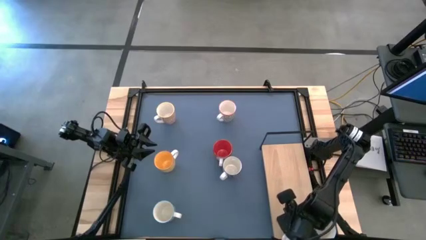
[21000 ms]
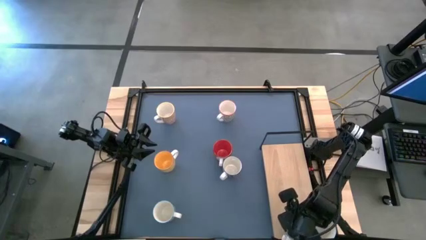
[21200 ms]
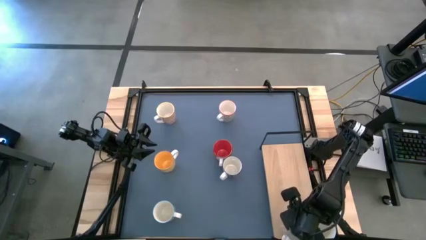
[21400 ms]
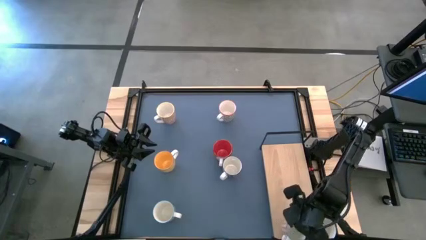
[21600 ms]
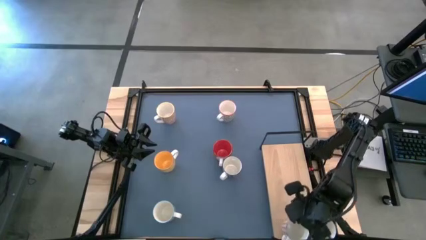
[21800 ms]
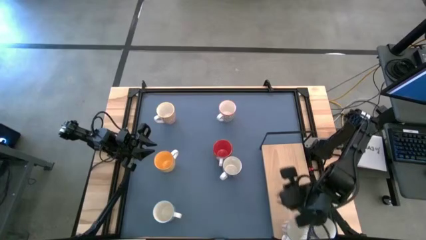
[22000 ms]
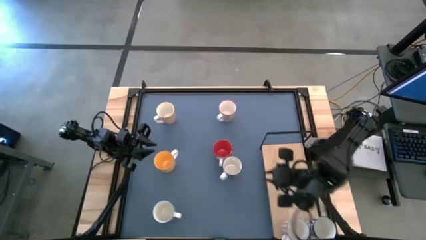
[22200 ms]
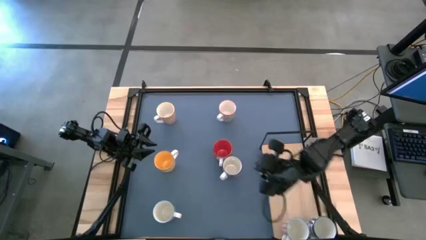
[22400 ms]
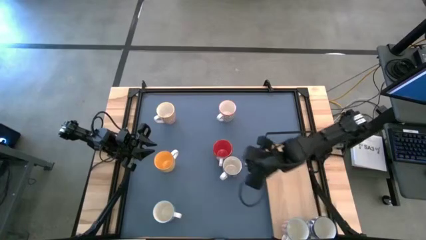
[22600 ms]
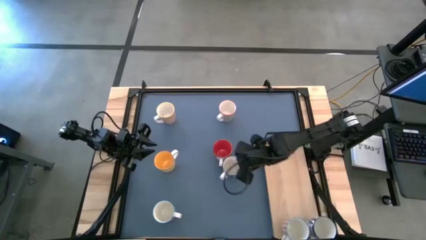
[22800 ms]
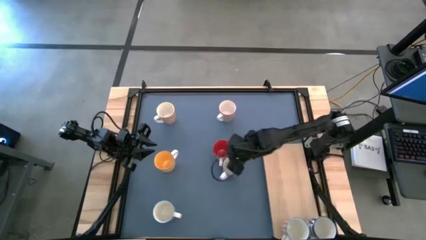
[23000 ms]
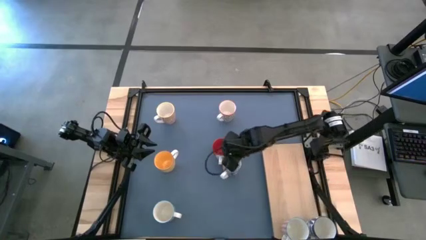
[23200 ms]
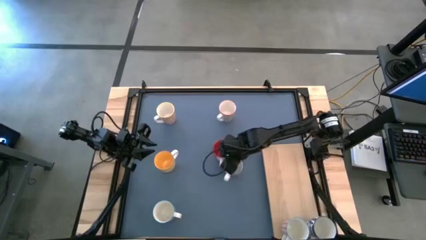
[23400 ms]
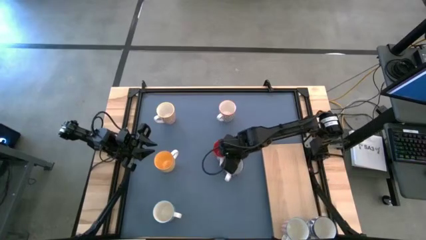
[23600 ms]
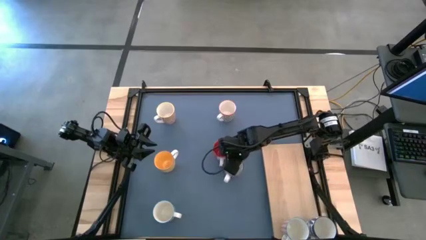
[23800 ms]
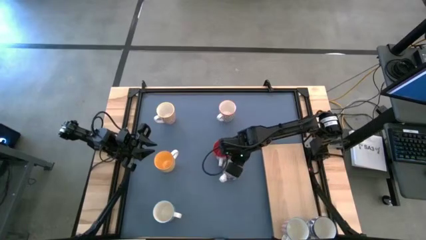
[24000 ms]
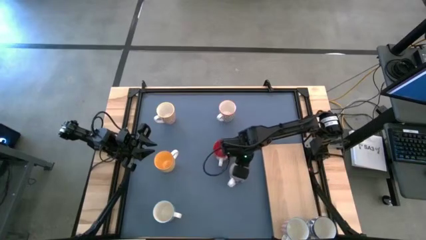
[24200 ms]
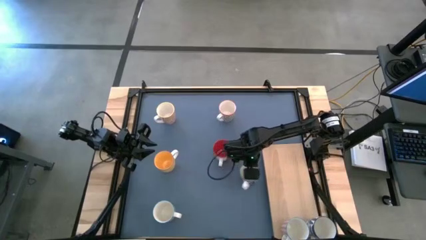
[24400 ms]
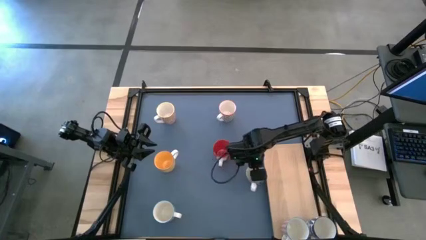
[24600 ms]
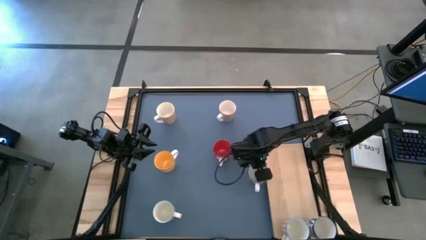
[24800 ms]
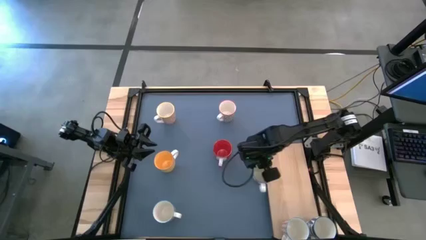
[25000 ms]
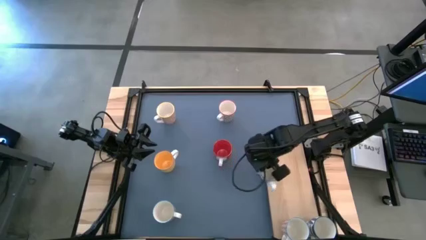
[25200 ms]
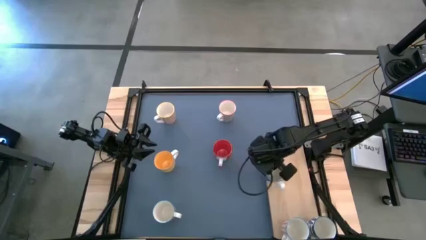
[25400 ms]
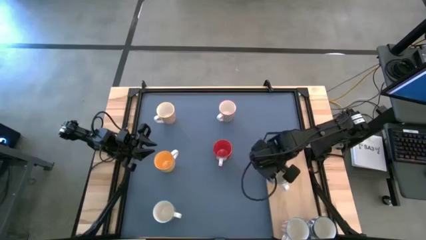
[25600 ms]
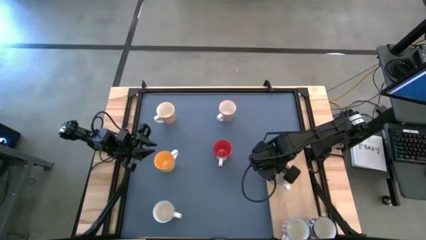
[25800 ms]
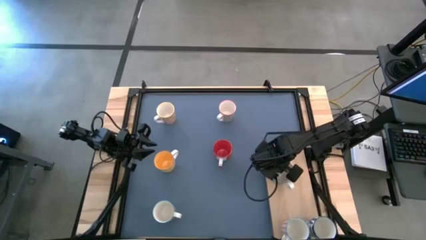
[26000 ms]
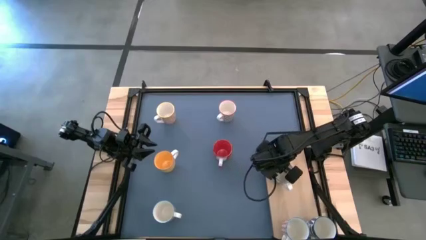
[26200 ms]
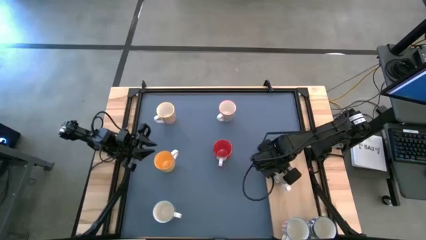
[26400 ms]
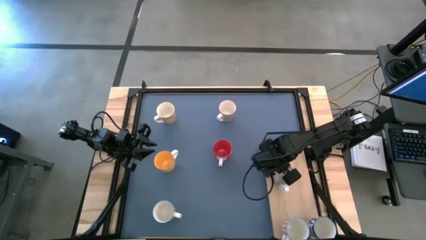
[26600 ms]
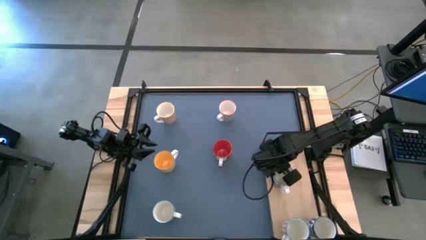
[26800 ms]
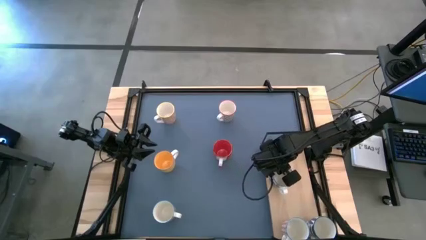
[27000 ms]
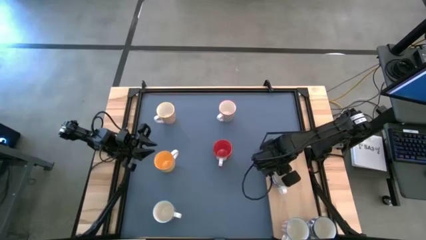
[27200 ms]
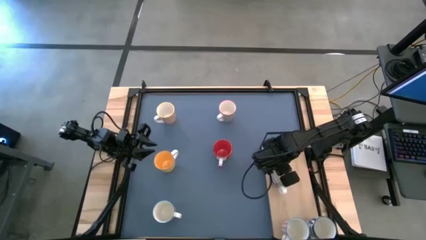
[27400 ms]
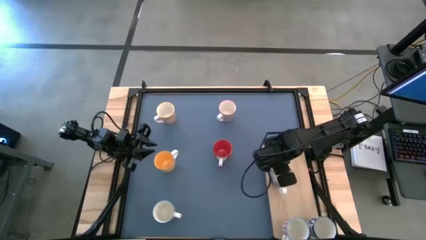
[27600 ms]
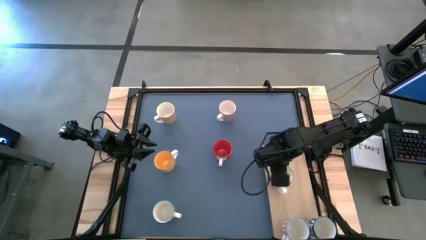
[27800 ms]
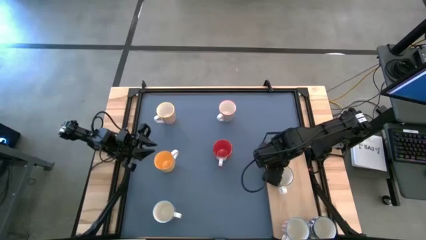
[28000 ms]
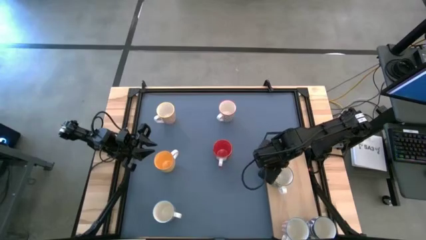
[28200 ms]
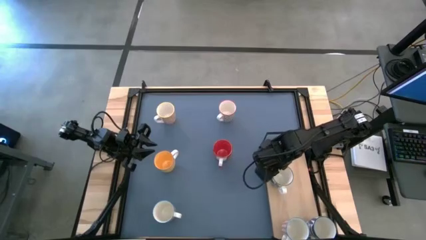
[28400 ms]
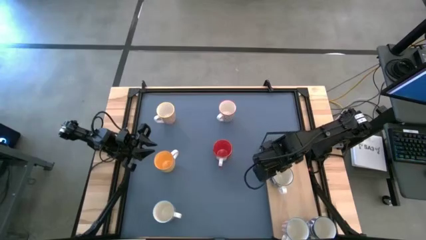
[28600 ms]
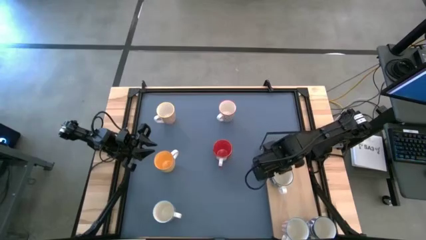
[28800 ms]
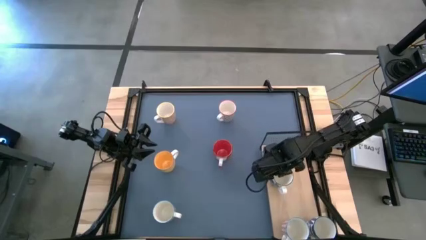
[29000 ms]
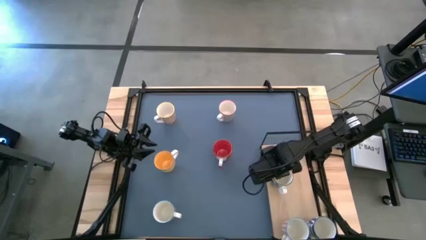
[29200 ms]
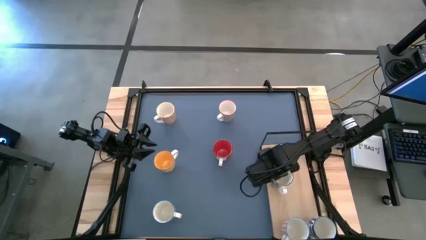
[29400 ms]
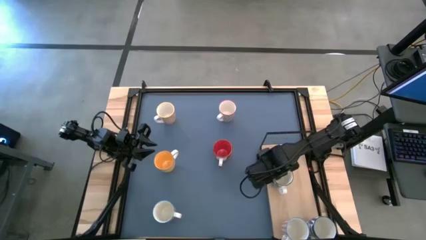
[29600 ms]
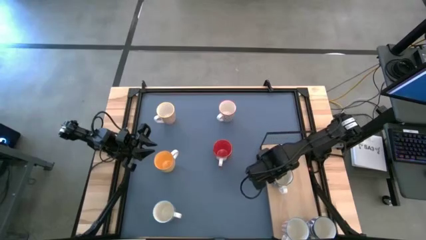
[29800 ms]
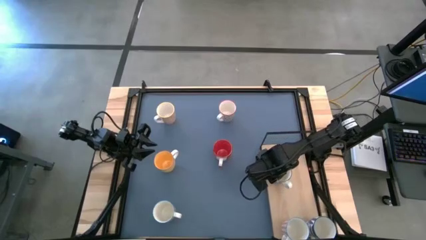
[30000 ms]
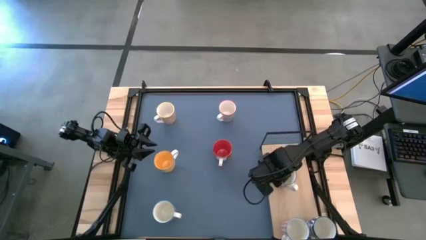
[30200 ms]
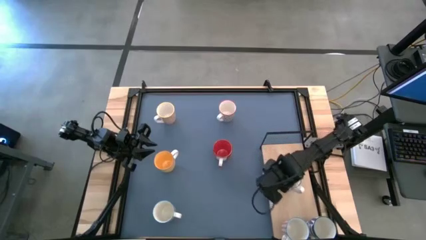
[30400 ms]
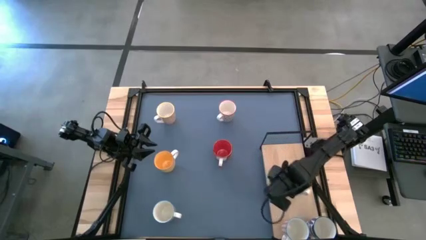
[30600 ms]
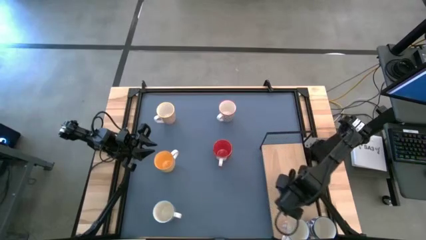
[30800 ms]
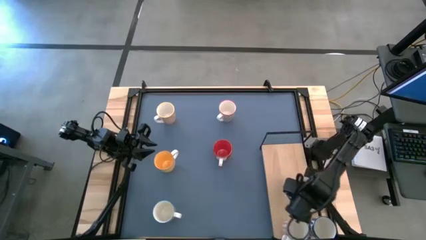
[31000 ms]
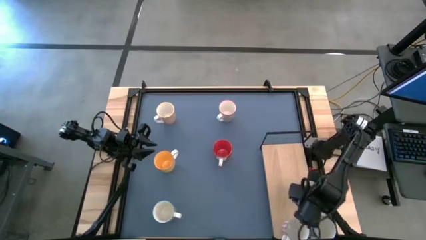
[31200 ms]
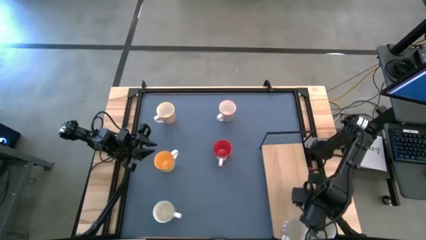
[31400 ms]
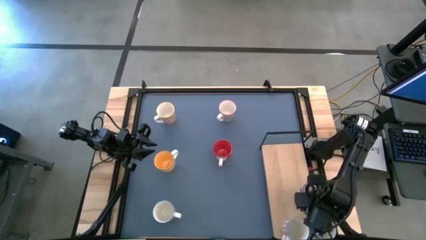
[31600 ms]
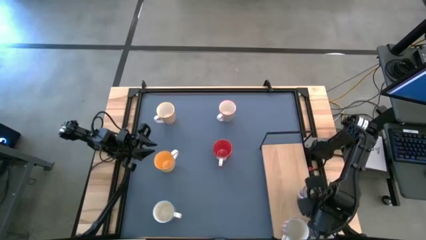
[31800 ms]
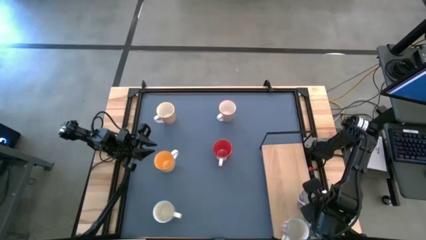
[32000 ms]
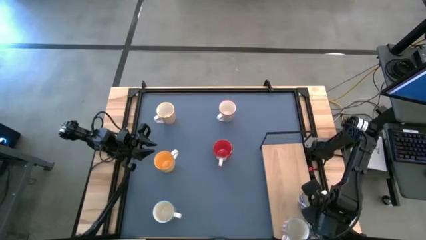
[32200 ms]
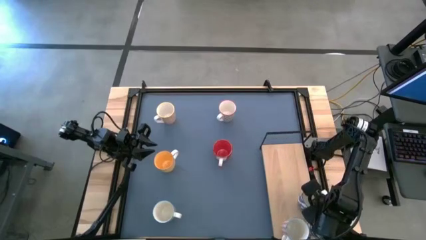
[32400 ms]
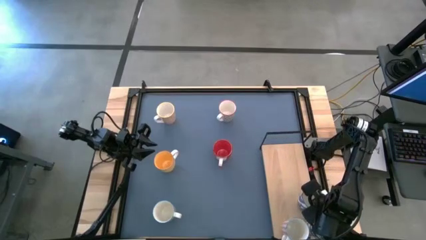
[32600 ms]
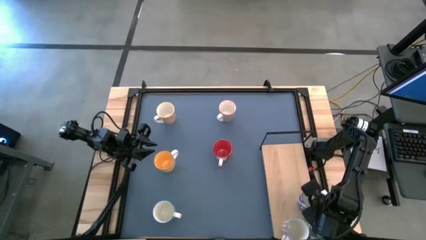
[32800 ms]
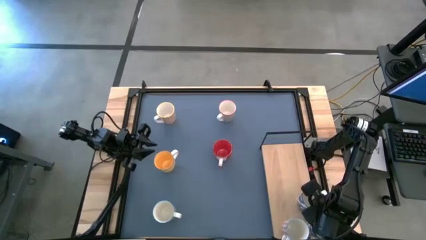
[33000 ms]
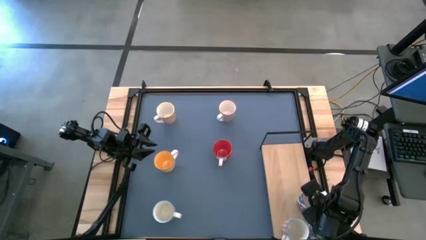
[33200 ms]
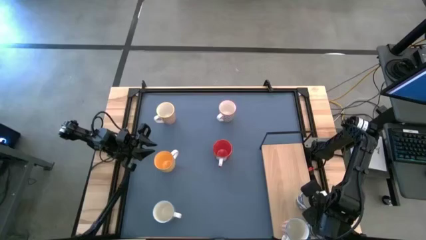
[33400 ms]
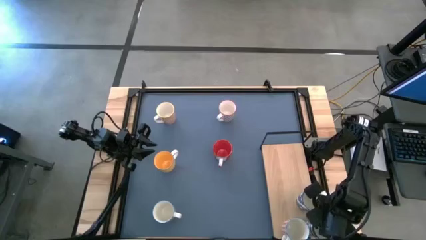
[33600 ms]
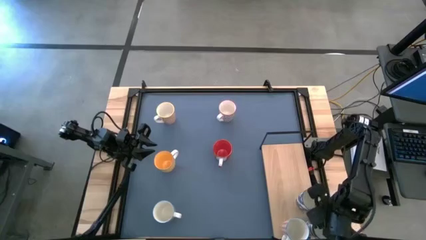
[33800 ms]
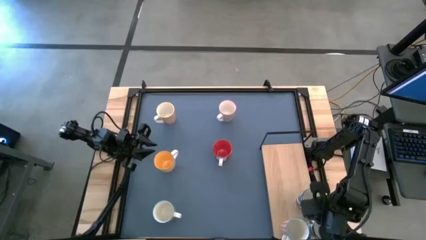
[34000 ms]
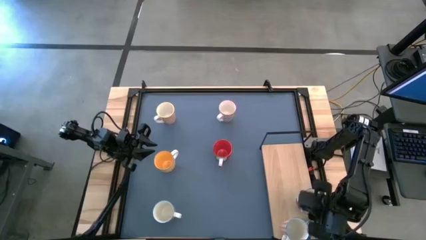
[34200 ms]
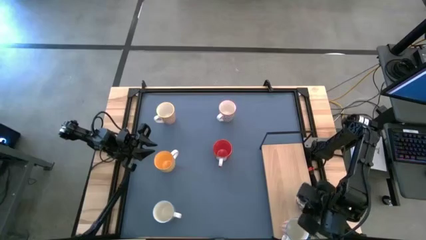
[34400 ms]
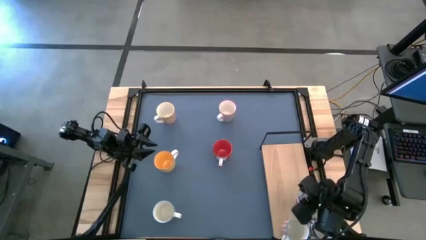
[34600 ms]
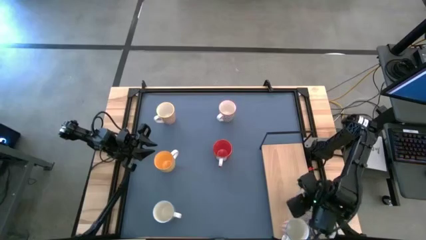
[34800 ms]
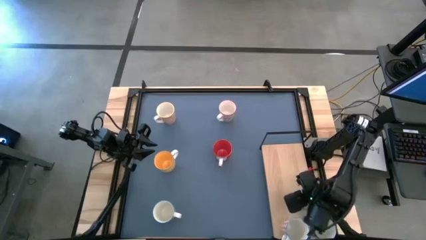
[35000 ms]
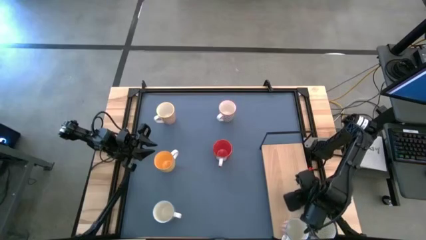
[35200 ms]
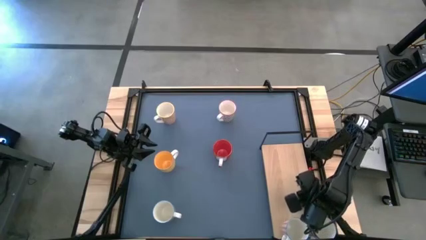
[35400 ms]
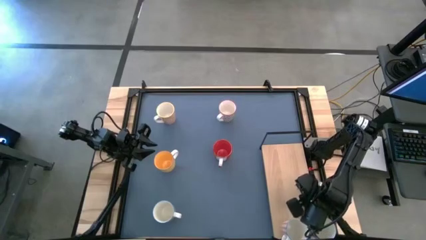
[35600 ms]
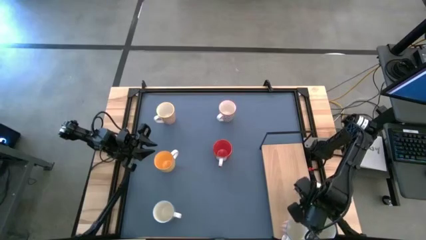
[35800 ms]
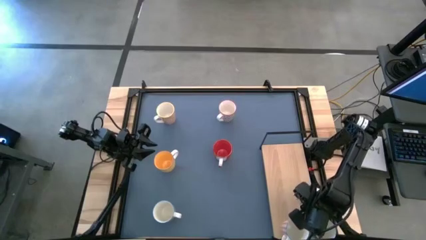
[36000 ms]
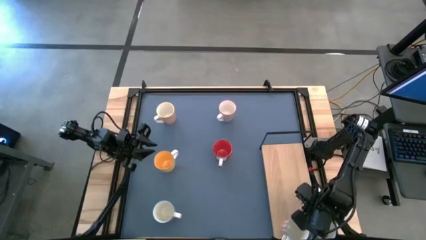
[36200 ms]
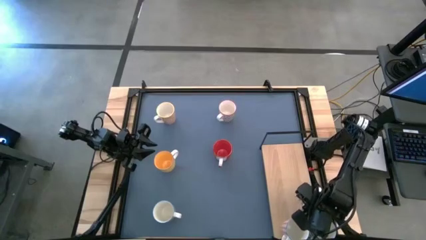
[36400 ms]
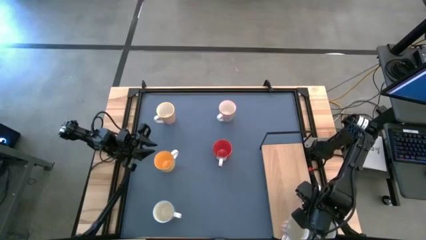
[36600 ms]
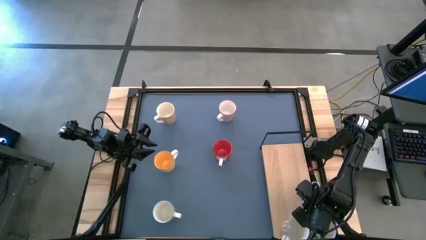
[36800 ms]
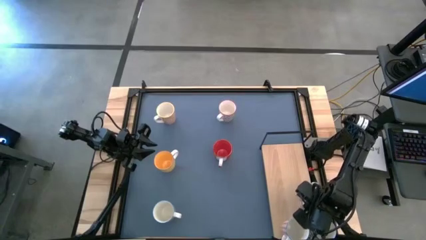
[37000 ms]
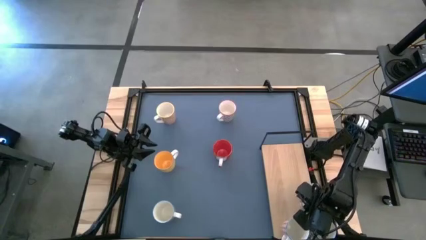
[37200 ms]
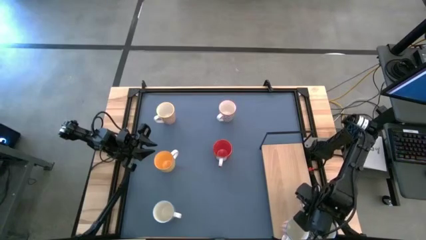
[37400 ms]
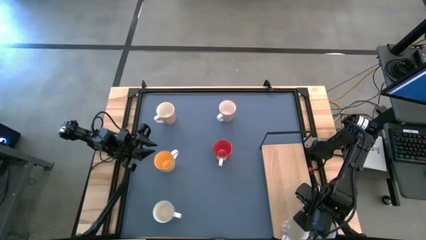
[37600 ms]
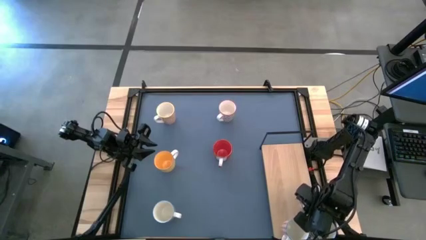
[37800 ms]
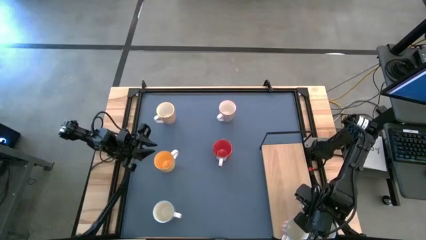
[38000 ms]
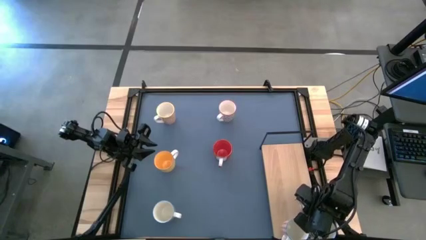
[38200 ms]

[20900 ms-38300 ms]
Task: Place coffee mugs
Put the blue pattern mug on the shelf
